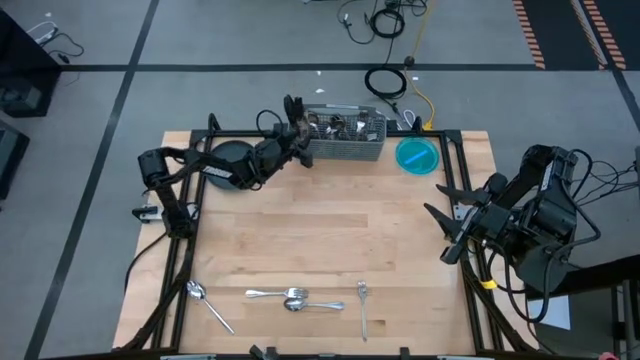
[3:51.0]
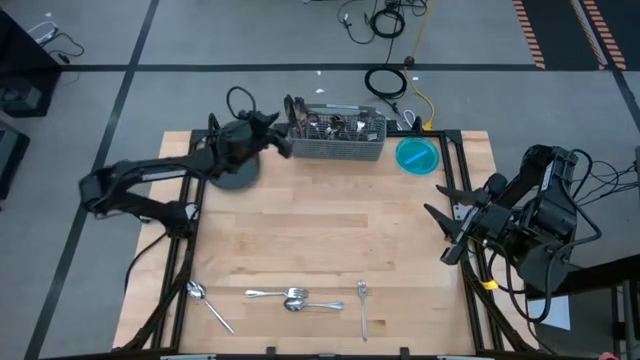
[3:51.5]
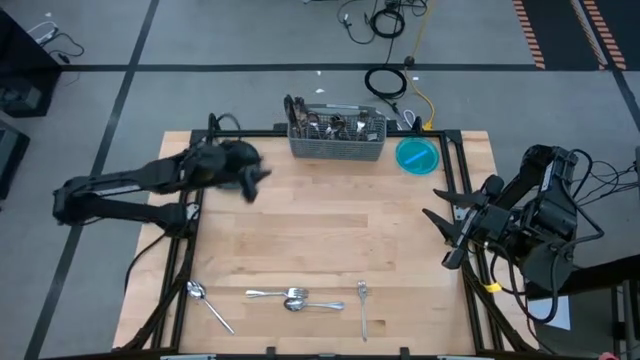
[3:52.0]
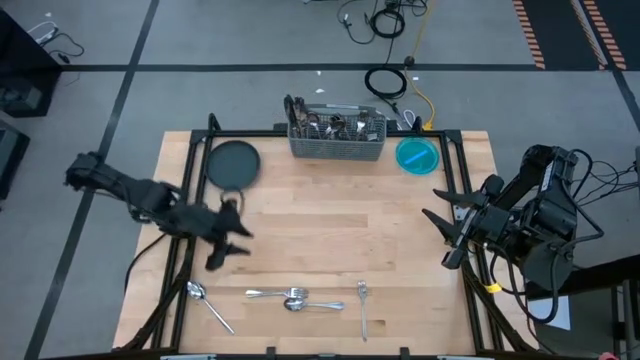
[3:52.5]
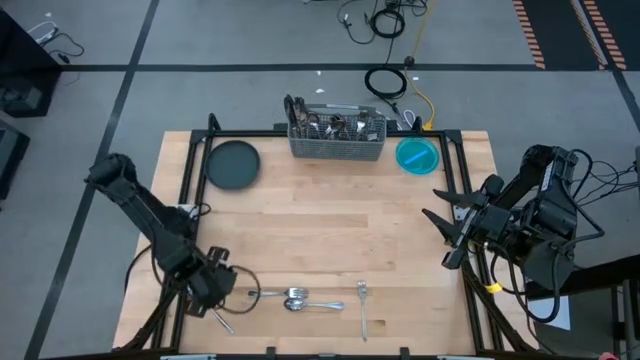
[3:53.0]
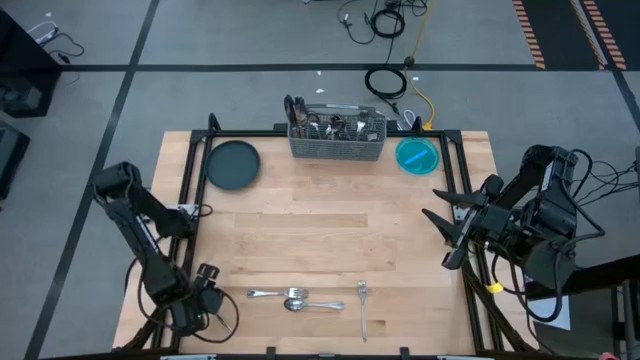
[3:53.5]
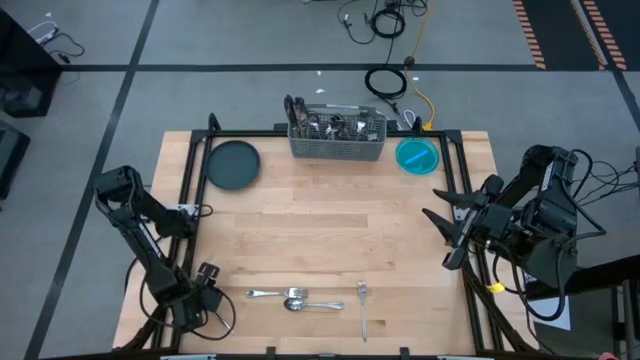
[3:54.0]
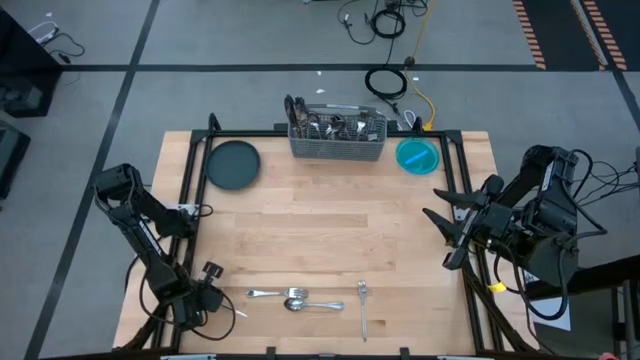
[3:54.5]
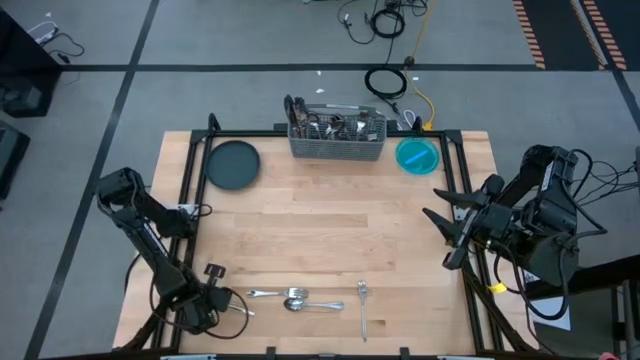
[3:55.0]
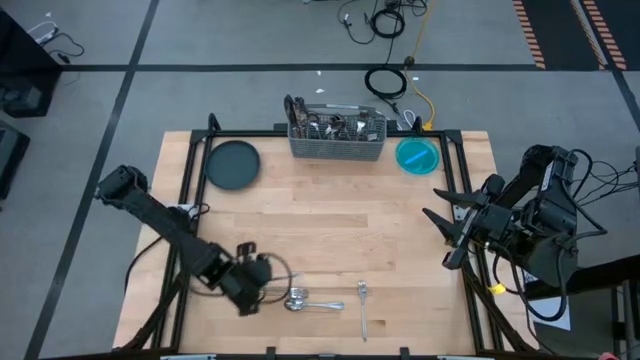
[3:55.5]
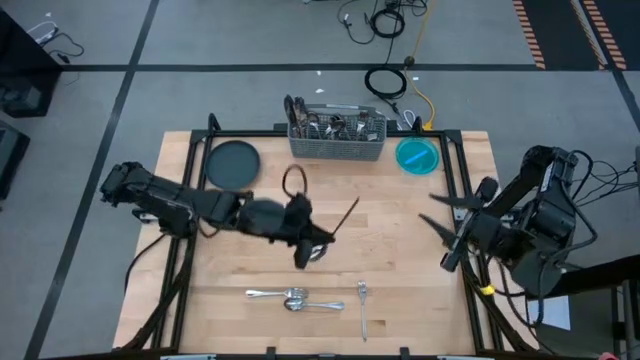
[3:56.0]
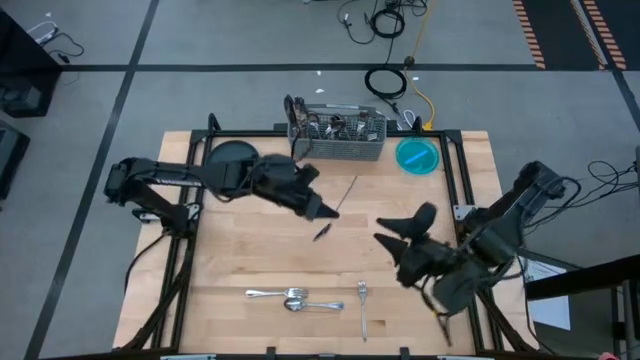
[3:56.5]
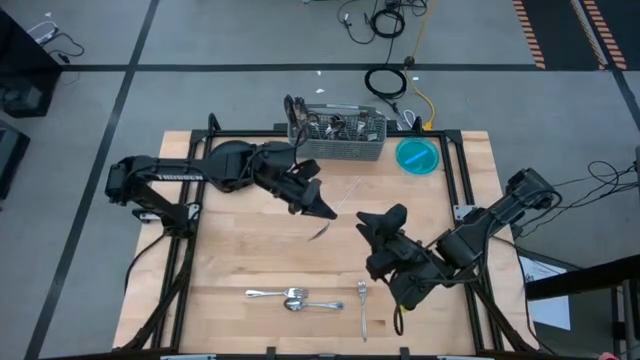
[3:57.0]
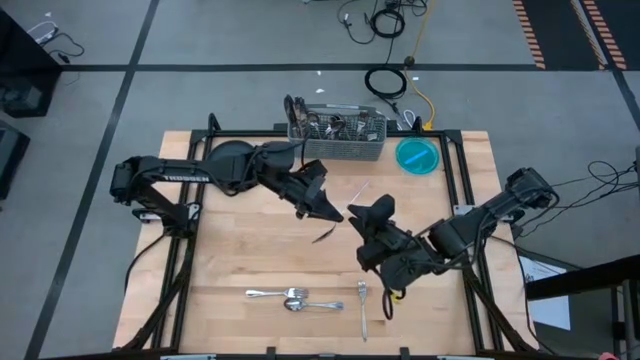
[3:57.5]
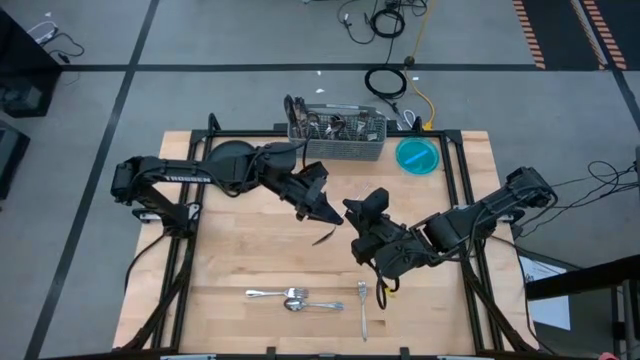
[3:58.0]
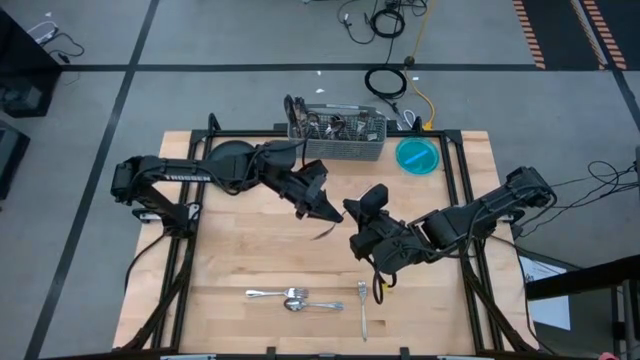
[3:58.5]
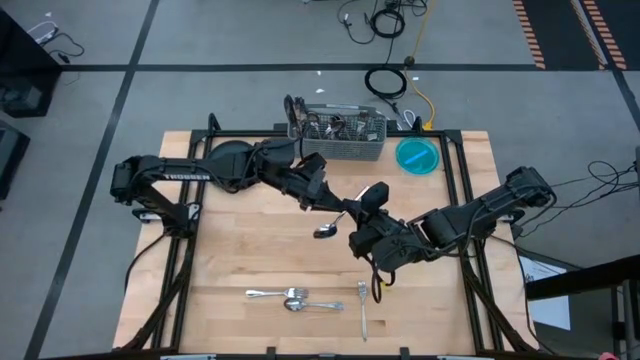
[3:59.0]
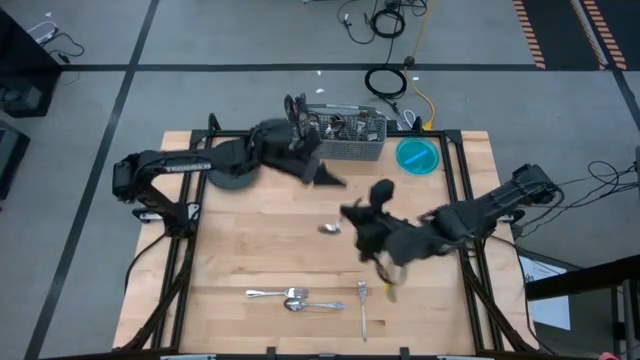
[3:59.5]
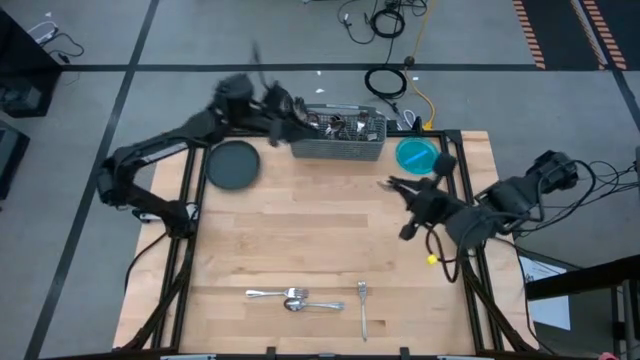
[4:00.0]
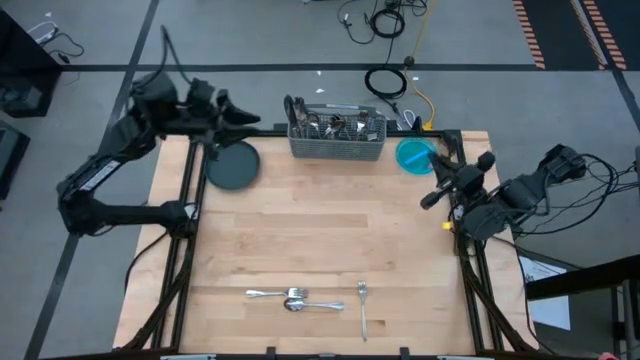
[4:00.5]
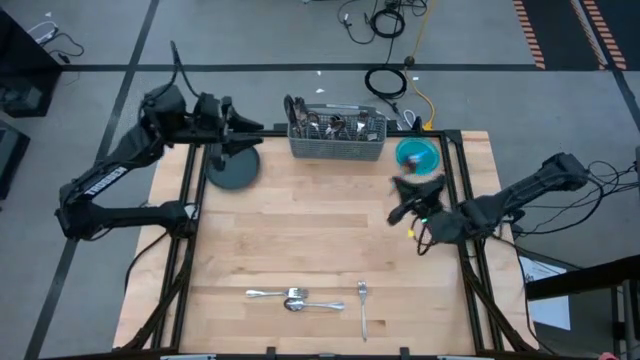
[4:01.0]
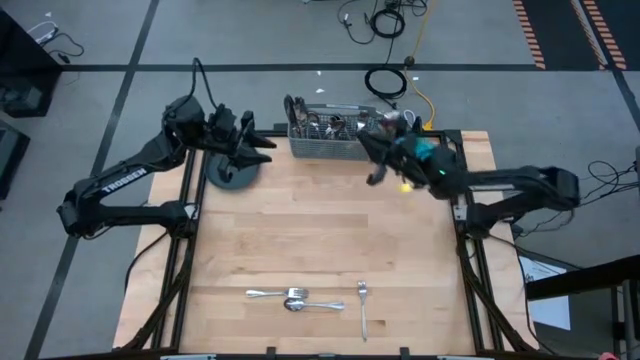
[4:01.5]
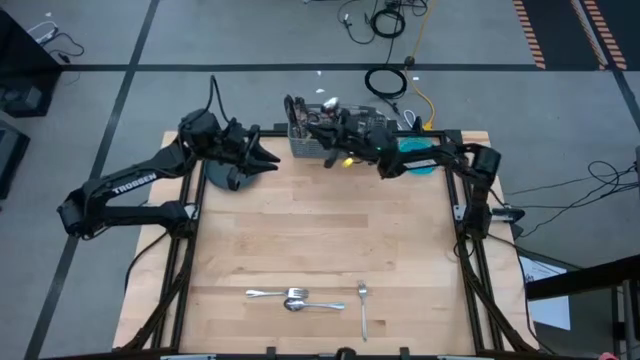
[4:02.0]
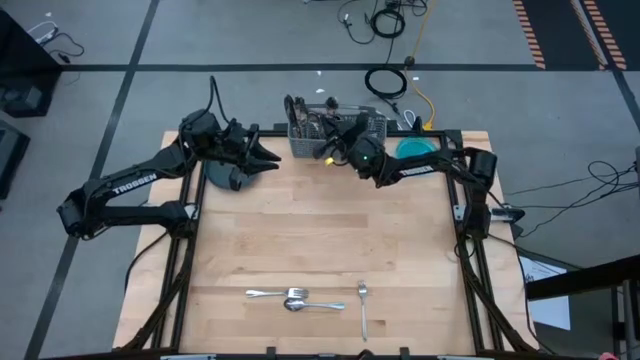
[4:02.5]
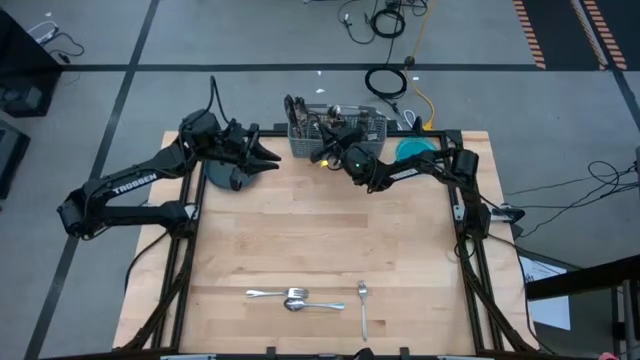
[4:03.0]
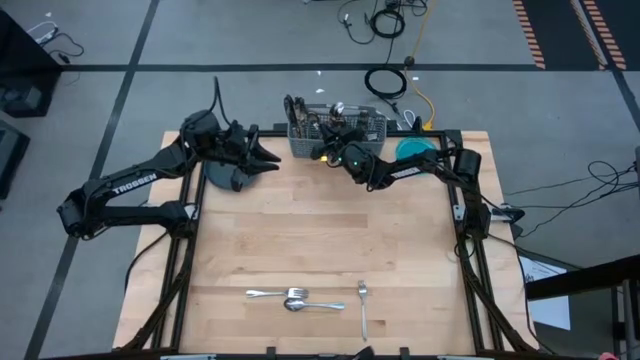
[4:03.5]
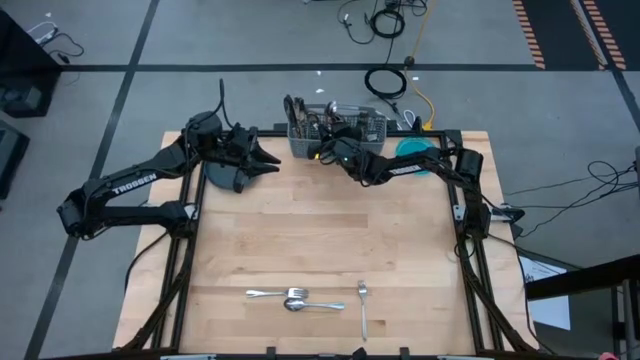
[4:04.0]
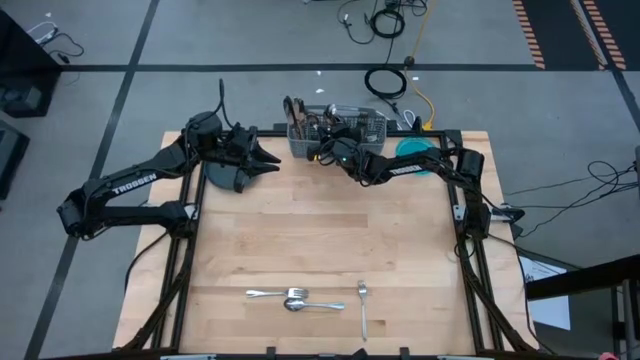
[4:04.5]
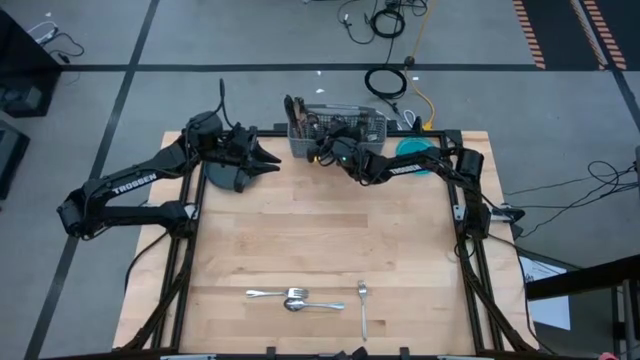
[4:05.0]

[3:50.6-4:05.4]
Task: Sort silverware
Put the spoon into the silverware organizer

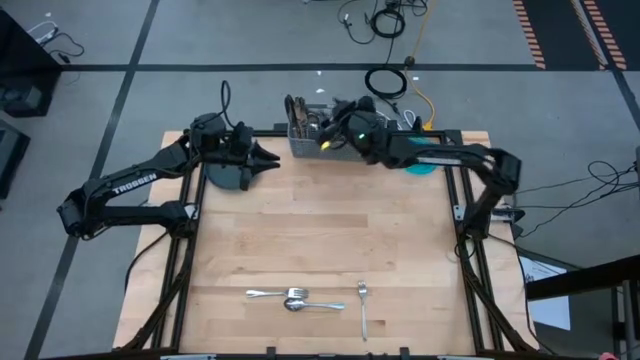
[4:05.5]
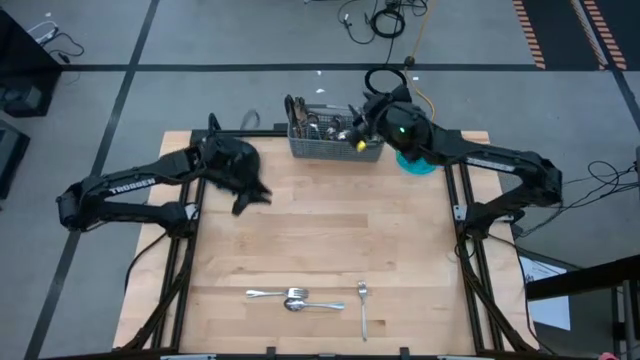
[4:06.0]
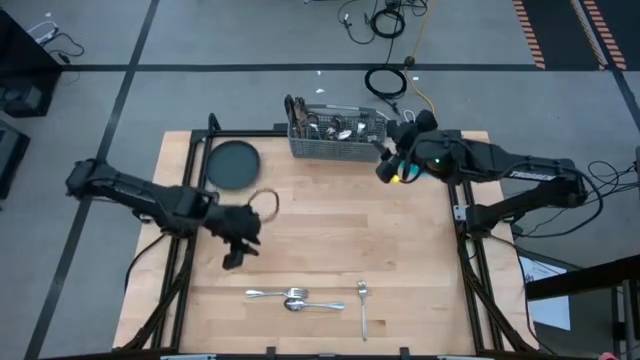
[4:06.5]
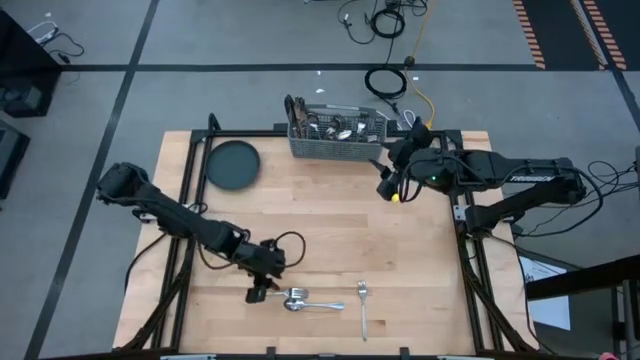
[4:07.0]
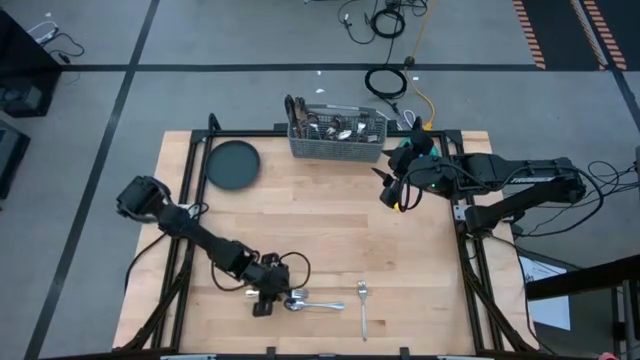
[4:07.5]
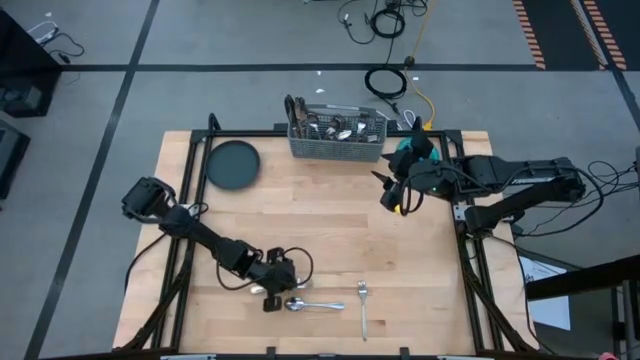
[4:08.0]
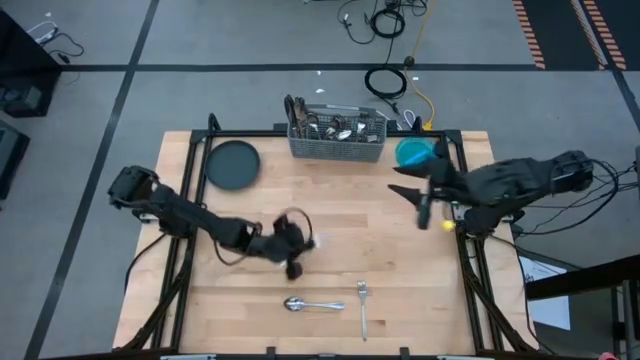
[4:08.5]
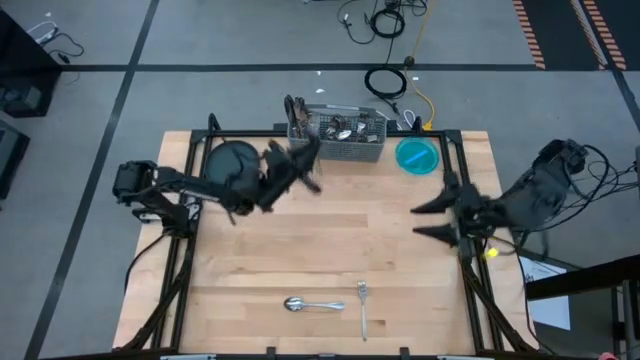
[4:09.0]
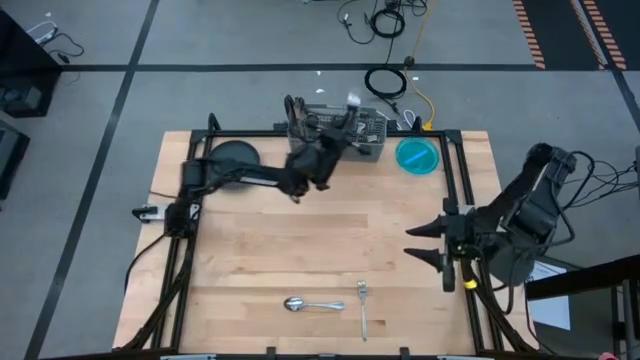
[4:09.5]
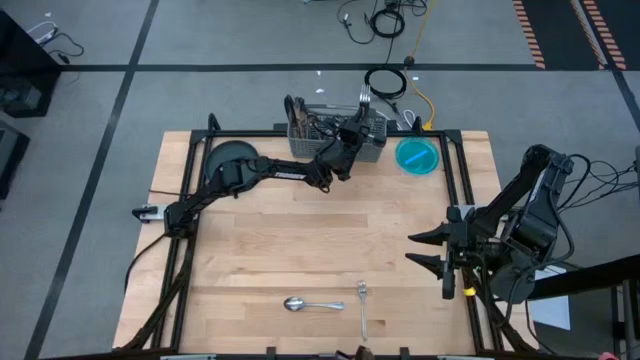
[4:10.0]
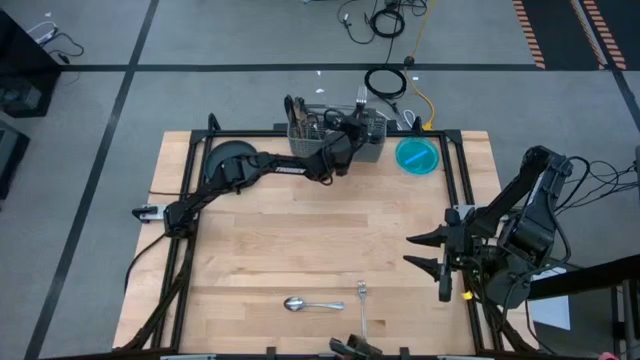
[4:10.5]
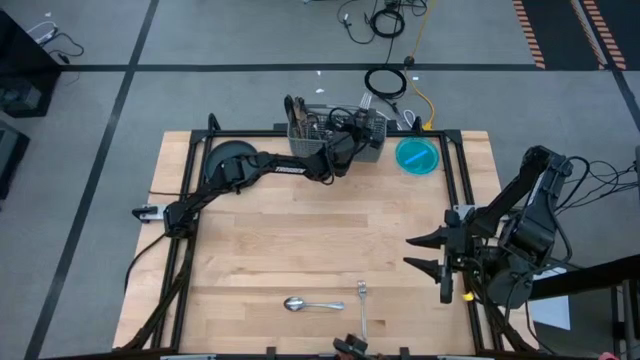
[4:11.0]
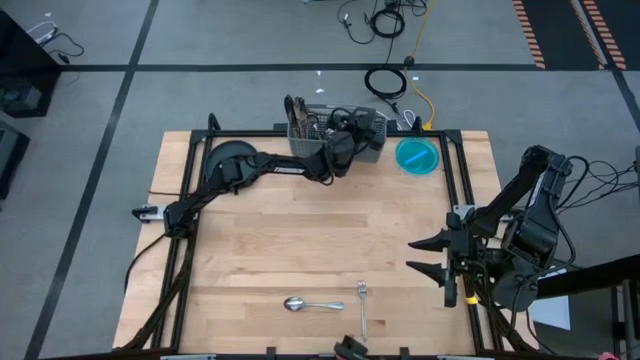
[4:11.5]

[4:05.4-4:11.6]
Put the fork into the silverware organizer

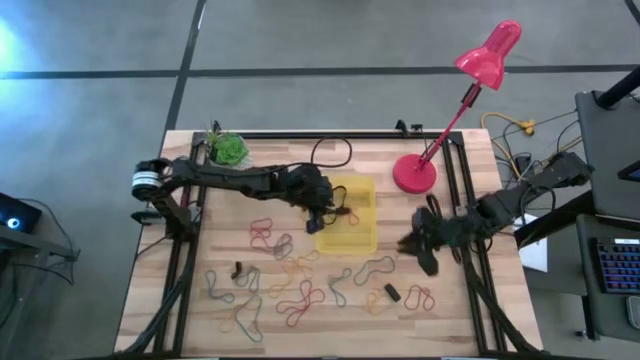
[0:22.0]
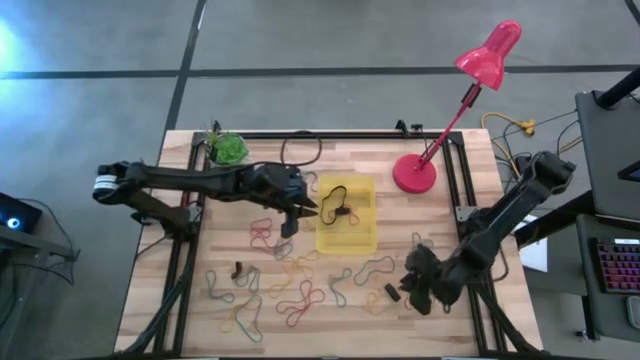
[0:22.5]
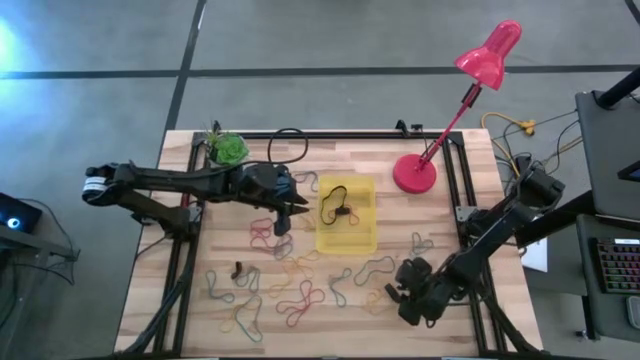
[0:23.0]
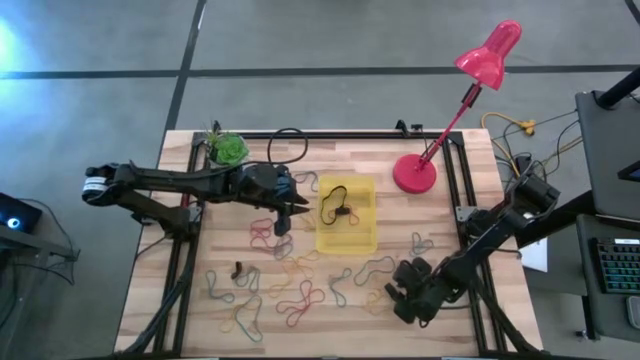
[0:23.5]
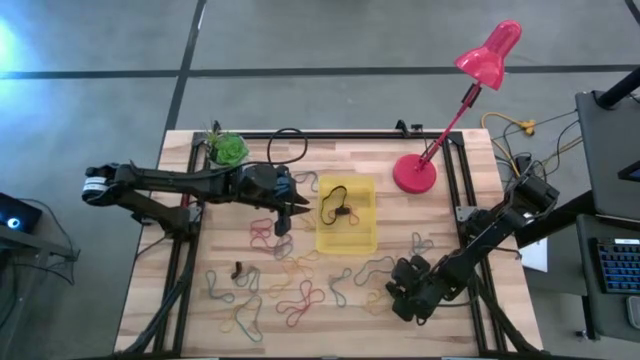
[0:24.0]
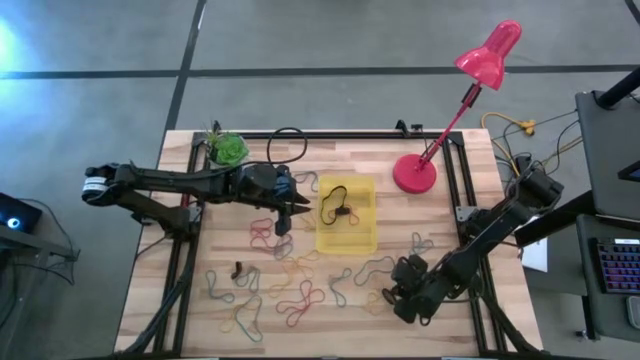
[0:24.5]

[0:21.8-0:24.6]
Task: Pick and place rubber bands into bin
Put the right black rubber band into the bin
